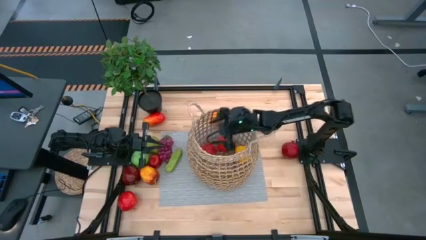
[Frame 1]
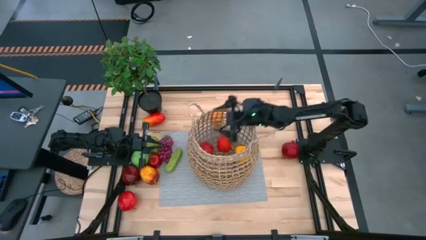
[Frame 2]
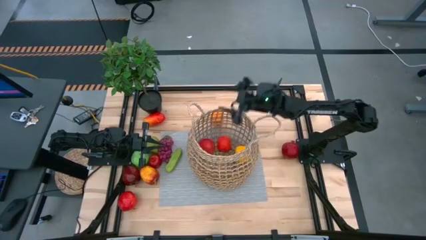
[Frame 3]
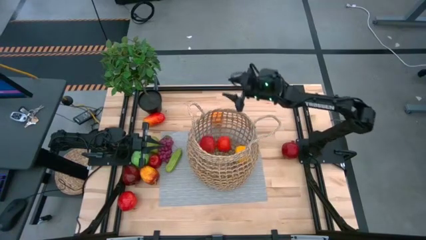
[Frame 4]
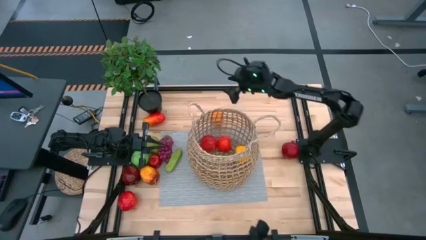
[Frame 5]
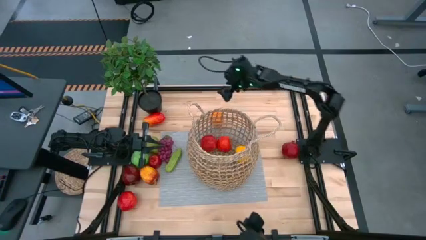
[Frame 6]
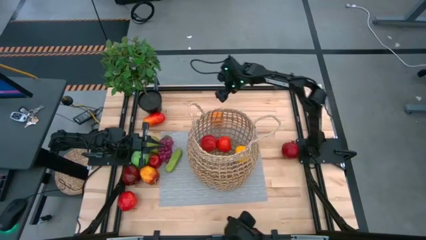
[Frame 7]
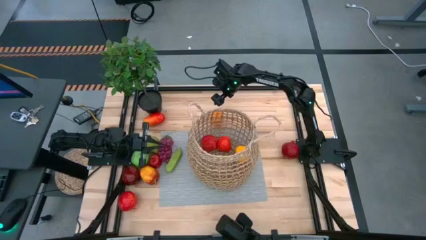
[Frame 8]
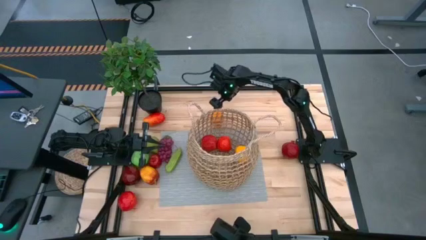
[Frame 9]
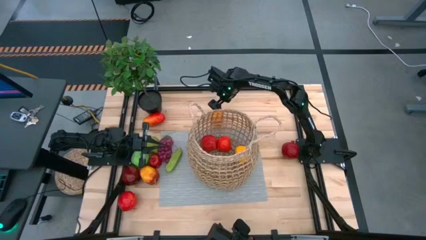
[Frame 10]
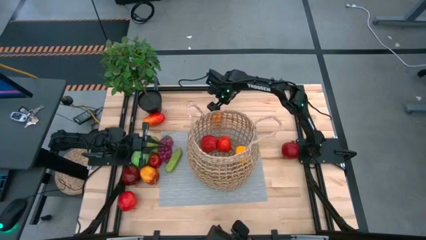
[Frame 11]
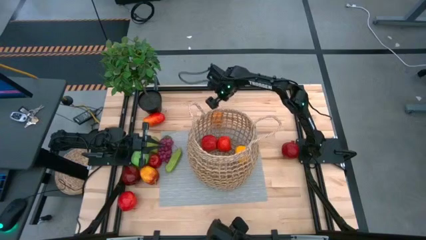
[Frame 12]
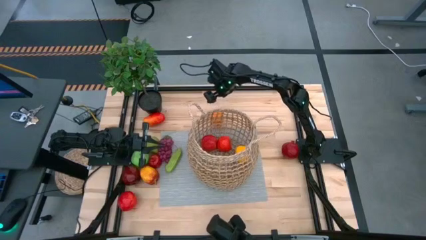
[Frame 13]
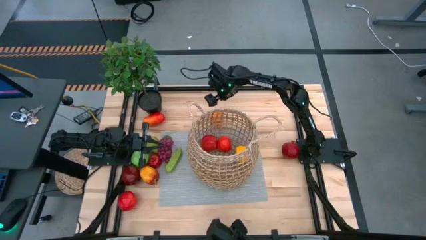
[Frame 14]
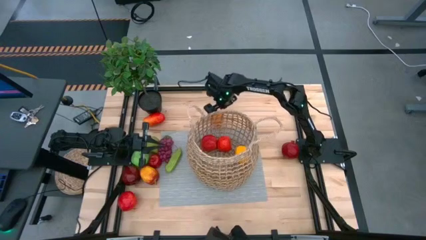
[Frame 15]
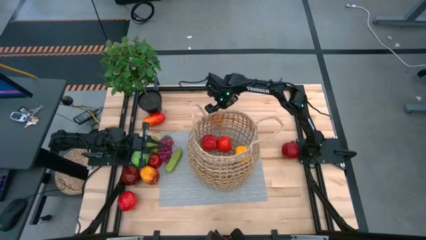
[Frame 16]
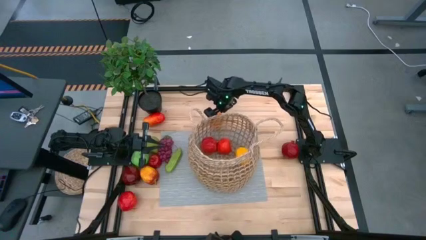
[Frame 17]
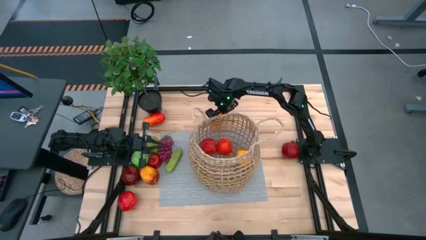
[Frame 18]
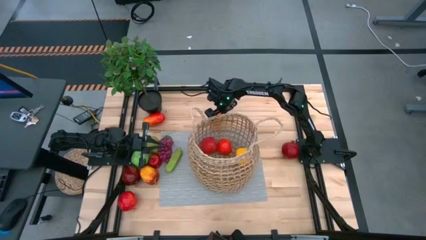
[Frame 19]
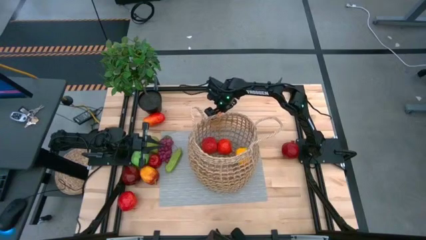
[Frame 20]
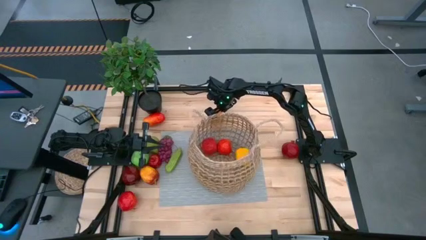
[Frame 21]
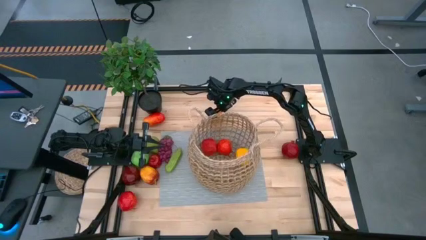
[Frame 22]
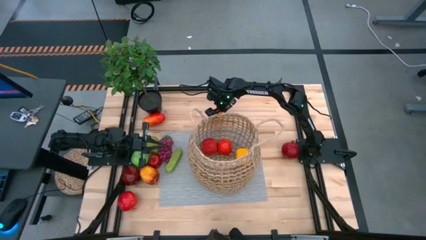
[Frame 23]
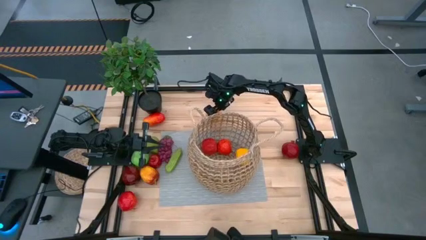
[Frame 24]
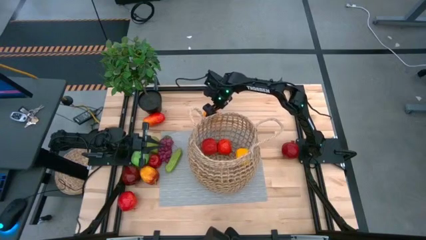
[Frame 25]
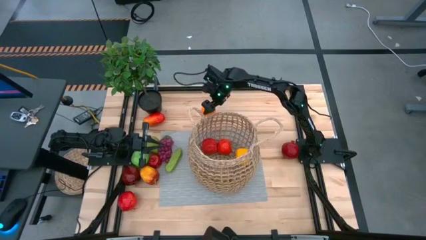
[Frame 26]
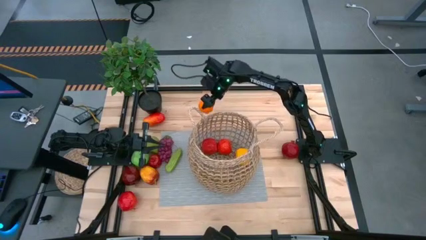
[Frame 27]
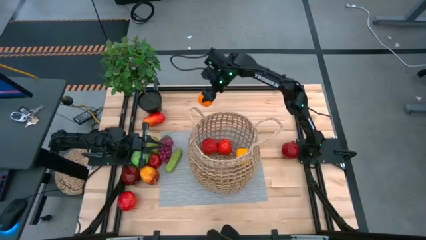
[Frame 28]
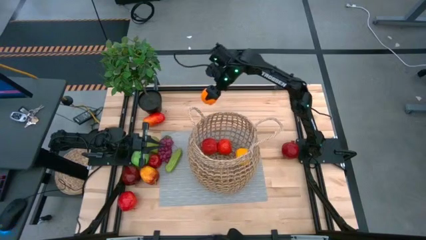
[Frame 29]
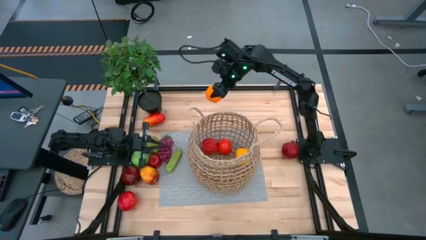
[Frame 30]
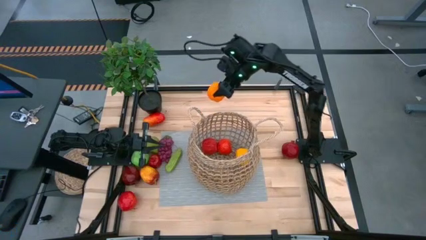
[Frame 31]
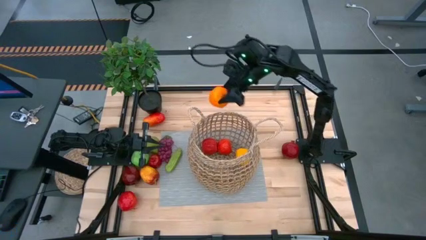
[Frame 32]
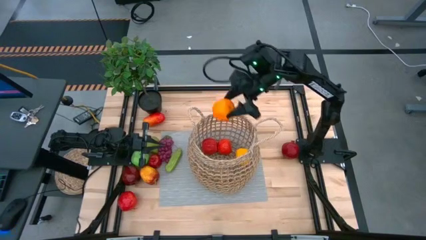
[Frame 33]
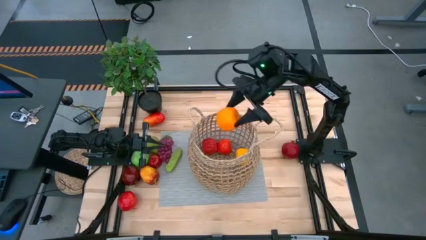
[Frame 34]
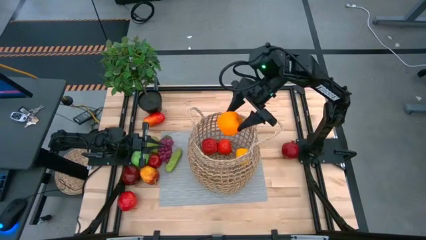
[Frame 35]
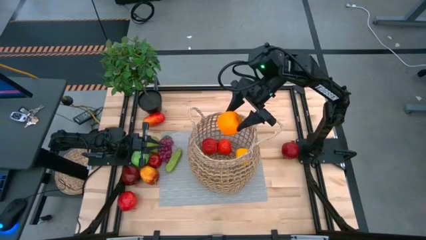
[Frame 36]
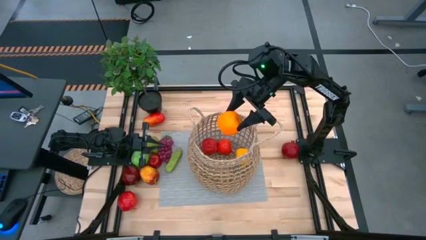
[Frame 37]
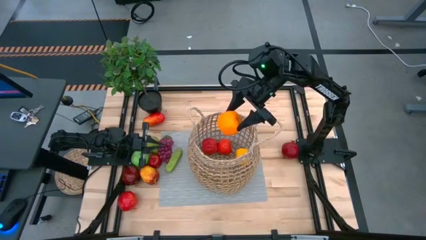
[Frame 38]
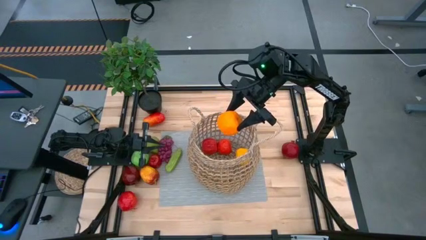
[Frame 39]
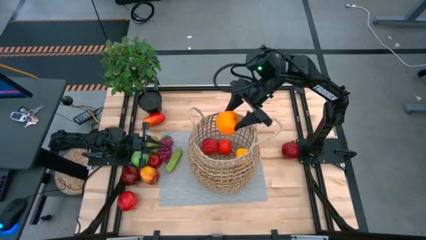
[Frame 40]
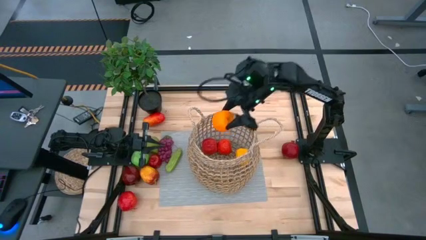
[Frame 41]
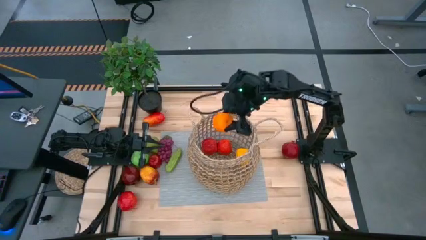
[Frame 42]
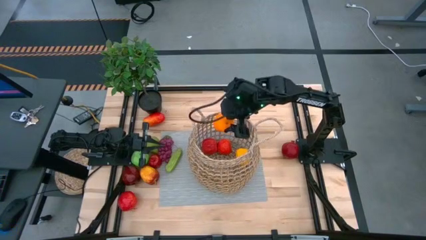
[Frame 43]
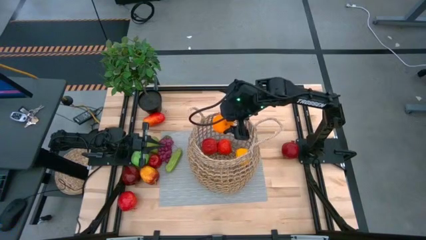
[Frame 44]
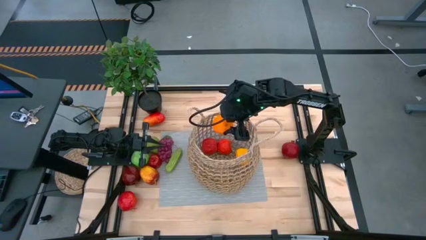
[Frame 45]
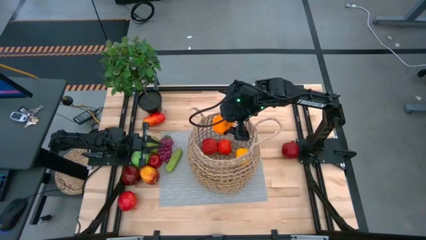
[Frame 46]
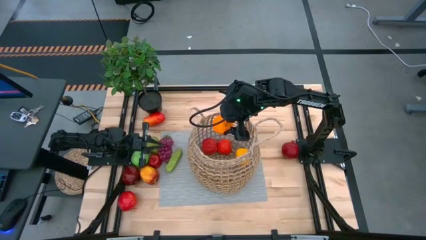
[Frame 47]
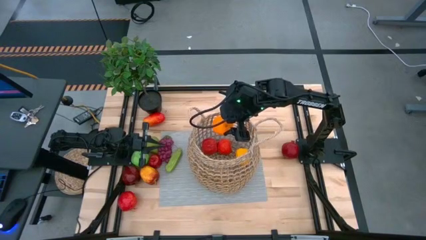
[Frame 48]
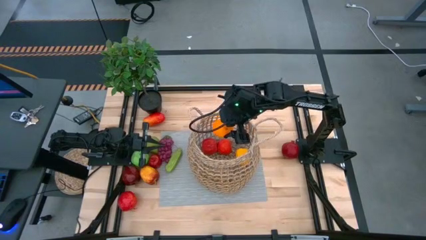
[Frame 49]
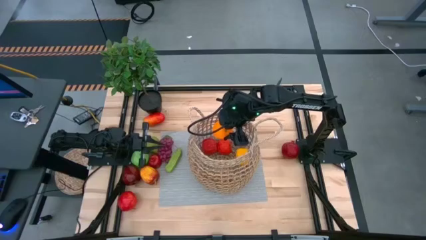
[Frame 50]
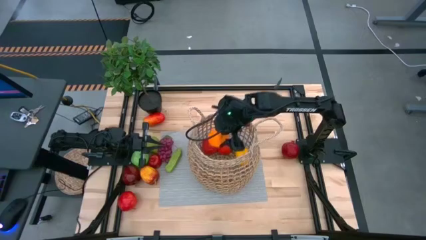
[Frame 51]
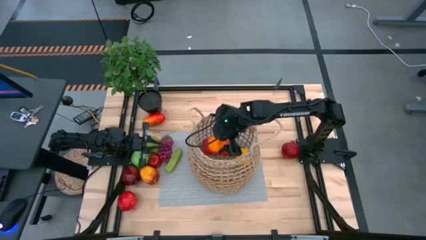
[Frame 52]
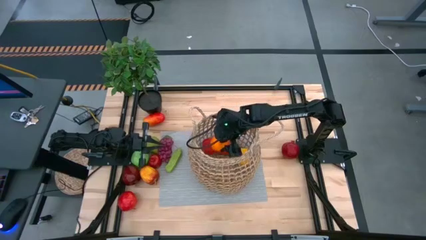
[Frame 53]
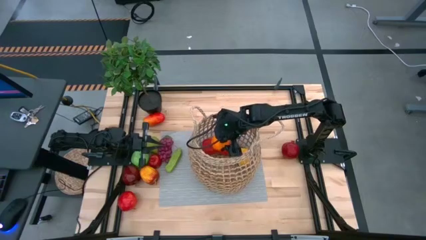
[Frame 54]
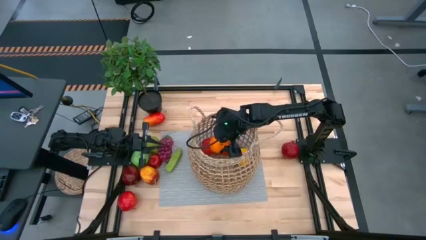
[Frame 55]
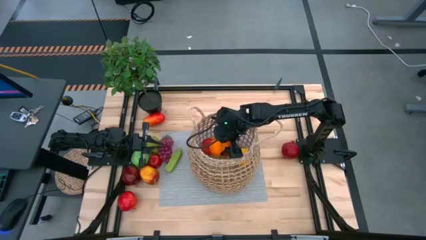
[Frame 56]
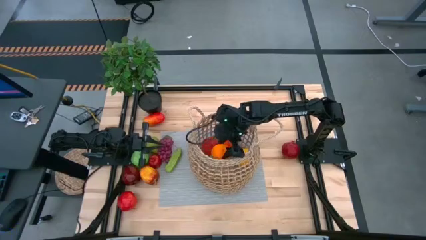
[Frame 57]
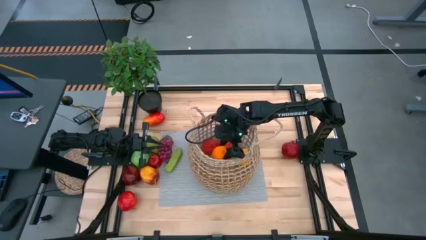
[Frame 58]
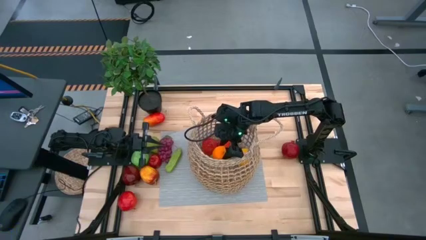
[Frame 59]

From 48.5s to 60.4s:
Task: Build produce basket
Put the orange into the brown basket

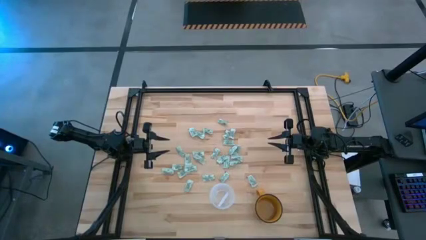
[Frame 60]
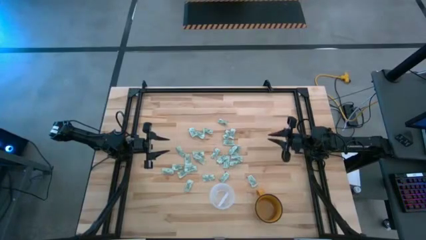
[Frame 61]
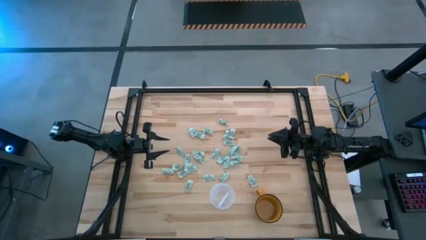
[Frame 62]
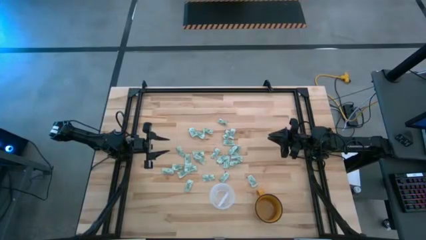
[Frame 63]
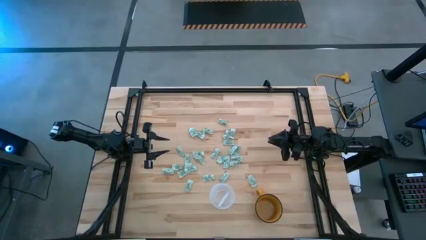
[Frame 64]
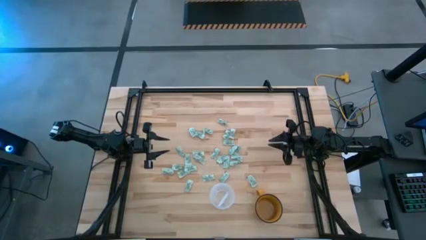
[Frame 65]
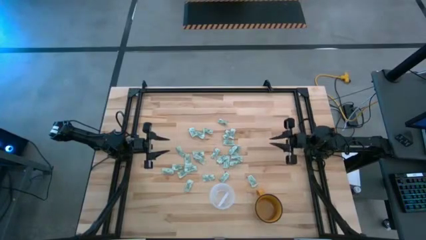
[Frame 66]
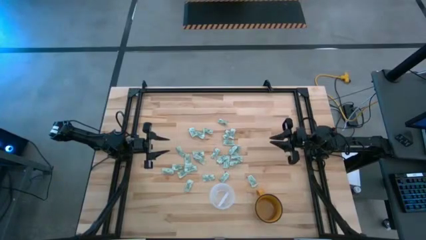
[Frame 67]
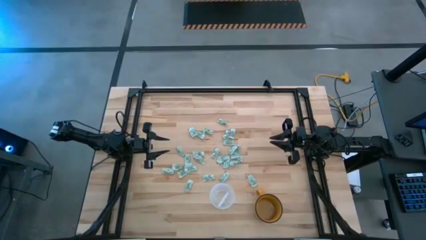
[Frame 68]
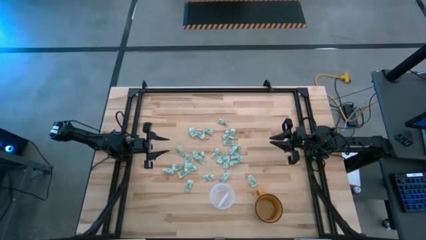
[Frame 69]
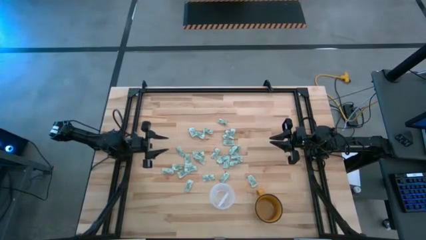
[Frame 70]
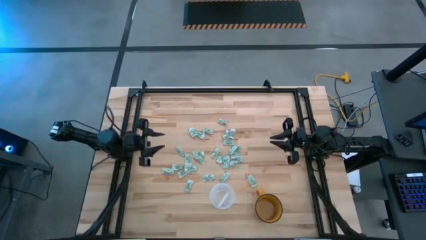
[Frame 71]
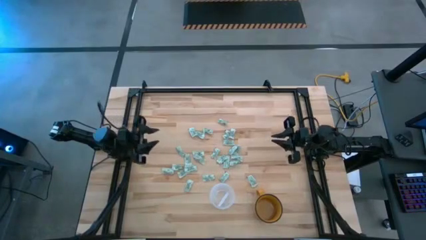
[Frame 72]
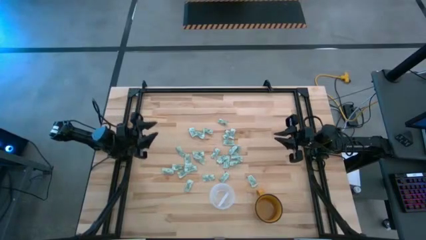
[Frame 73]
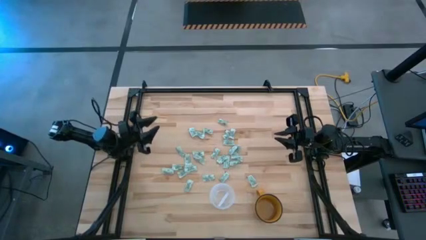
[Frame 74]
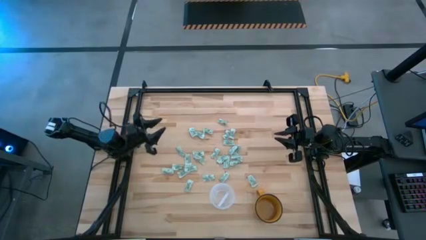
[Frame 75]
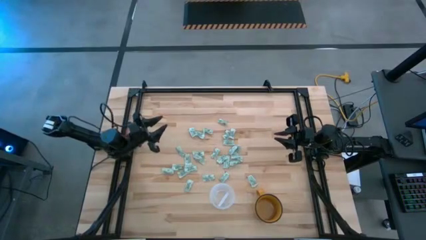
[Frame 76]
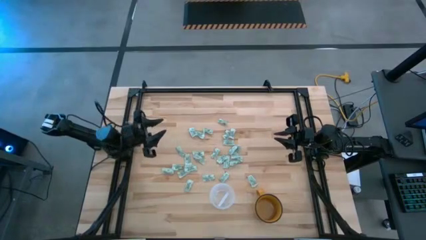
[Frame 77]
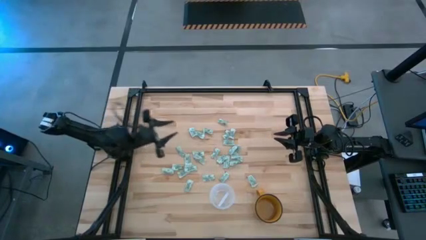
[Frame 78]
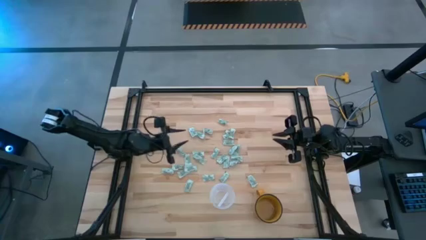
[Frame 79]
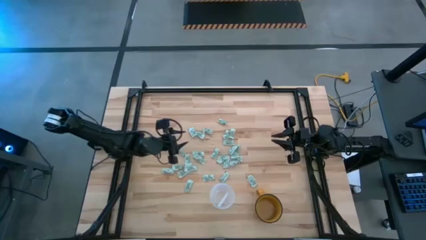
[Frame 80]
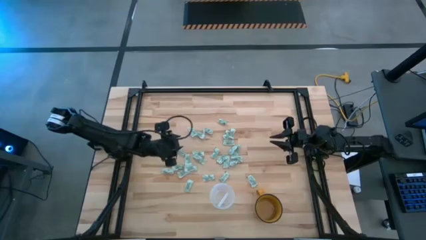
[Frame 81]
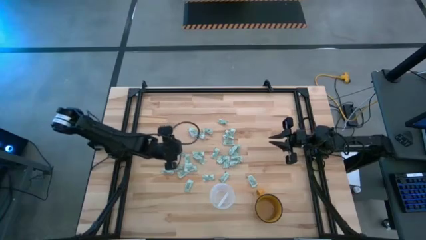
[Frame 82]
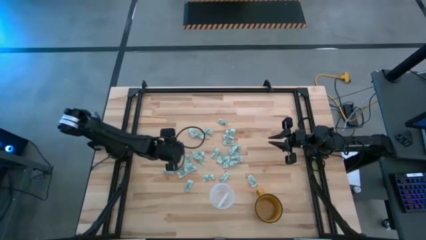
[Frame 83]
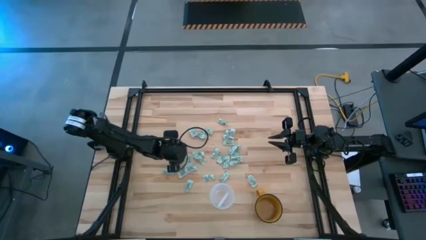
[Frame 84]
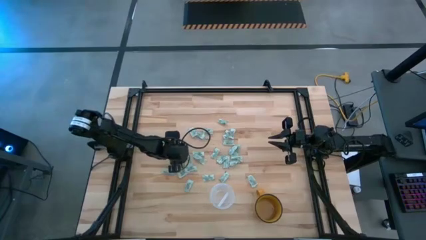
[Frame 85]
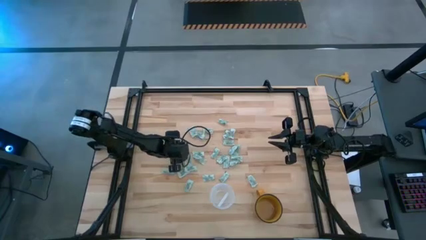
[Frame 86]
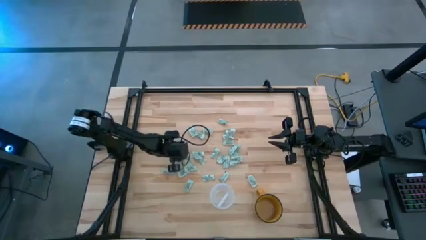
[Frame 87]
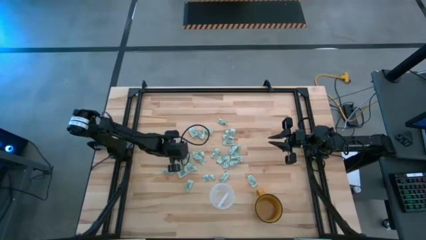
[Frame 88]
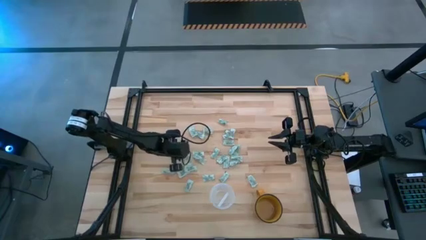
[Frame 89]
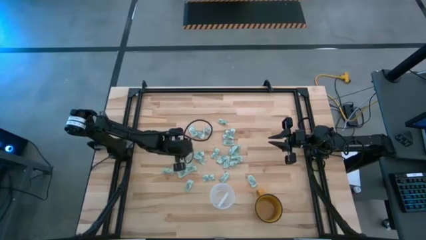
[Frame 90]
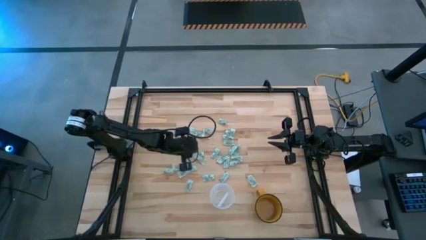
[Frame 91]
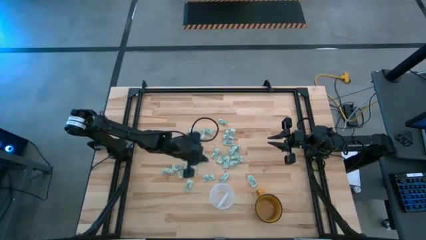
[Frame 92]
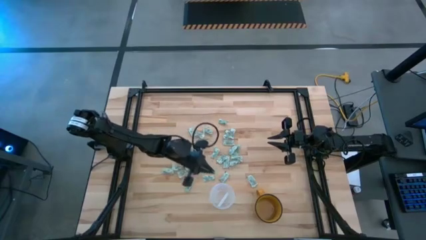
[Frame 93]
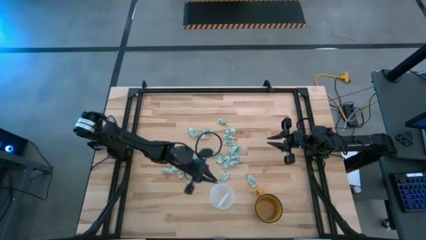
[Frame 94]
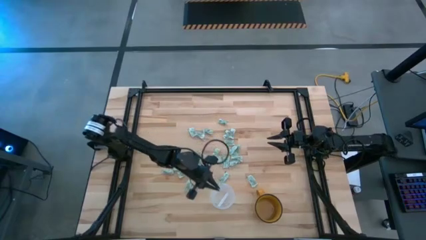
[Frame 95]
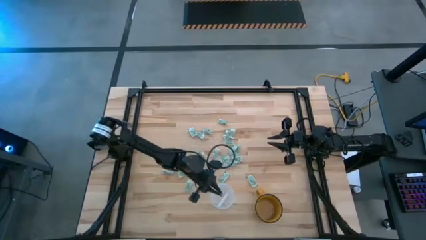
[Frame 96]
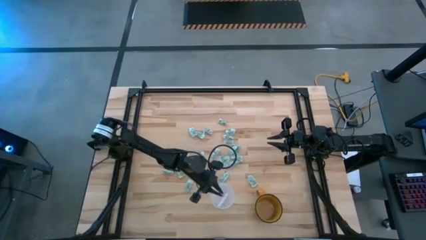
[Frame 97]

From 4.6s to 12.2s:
Task: Pick and place Stevia / Truvia into bins
Put the stevia packet into the transparent bin
